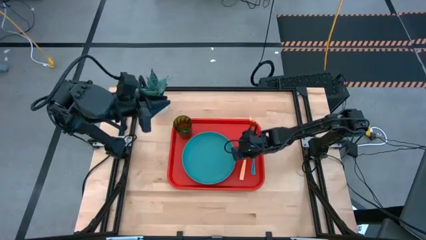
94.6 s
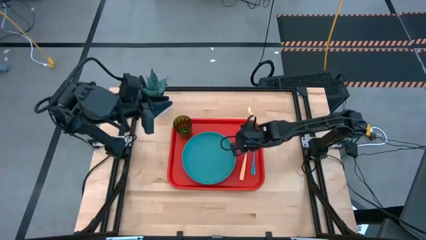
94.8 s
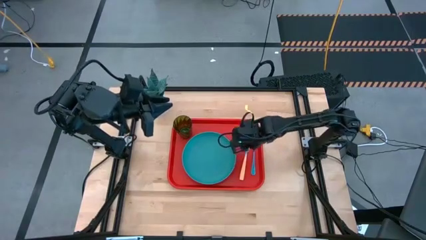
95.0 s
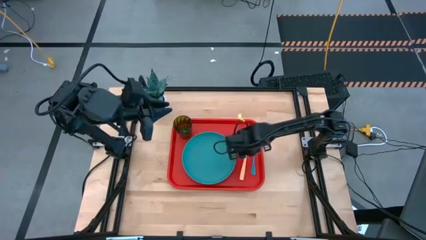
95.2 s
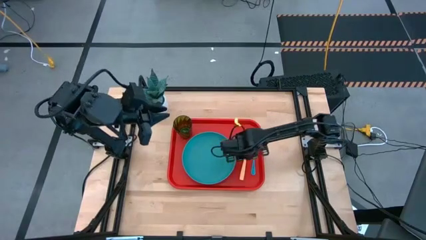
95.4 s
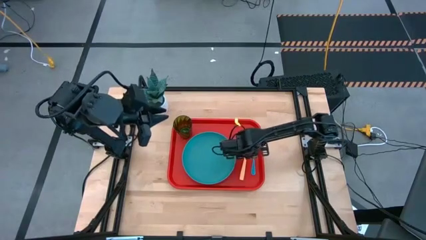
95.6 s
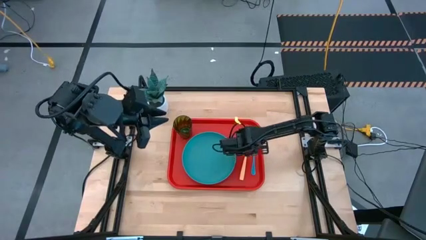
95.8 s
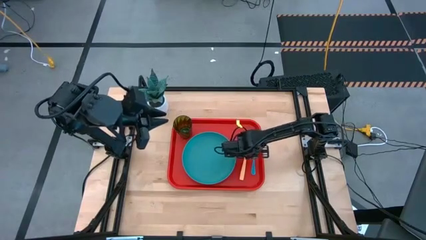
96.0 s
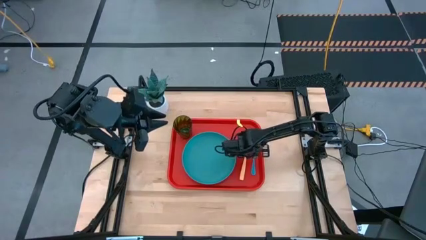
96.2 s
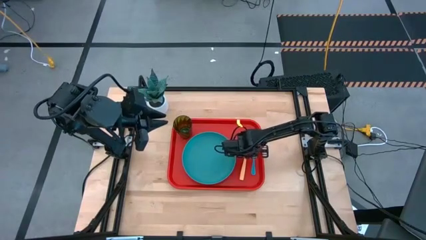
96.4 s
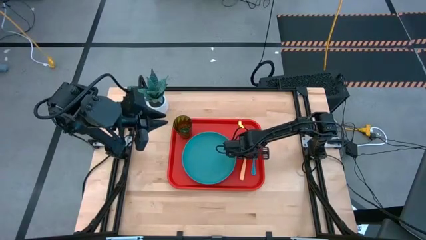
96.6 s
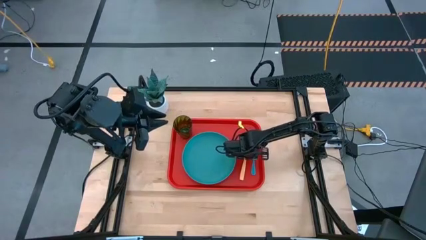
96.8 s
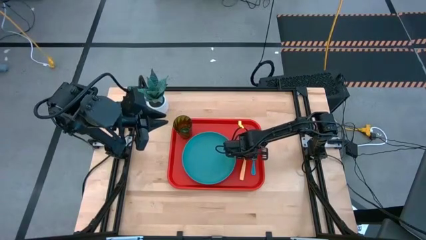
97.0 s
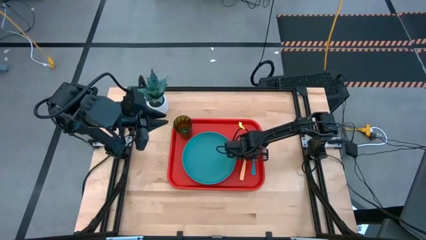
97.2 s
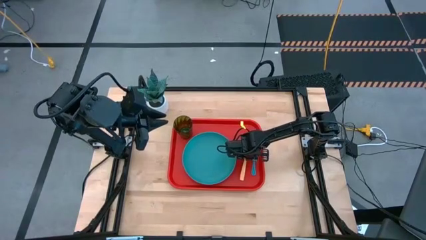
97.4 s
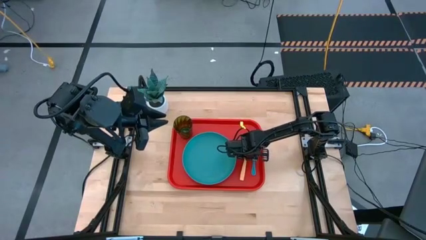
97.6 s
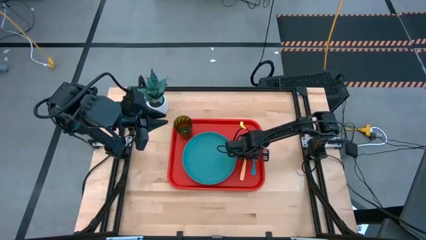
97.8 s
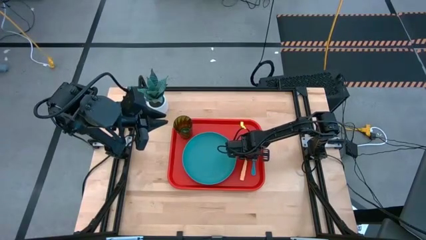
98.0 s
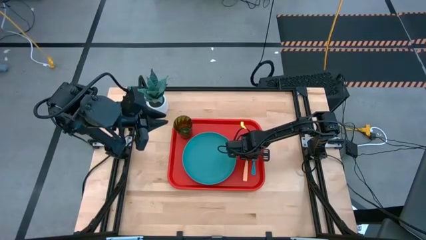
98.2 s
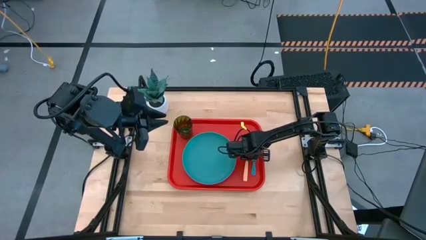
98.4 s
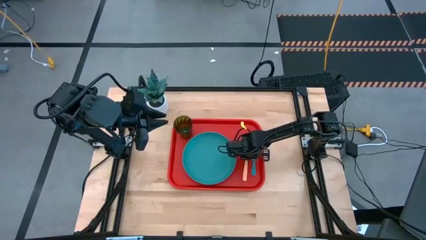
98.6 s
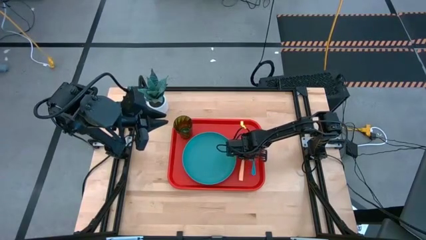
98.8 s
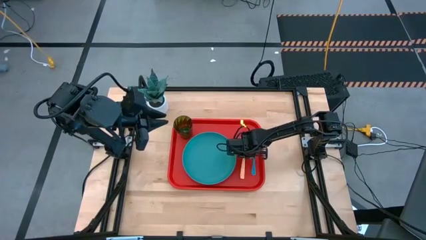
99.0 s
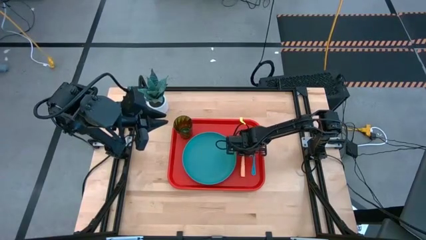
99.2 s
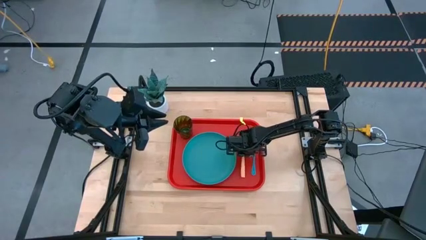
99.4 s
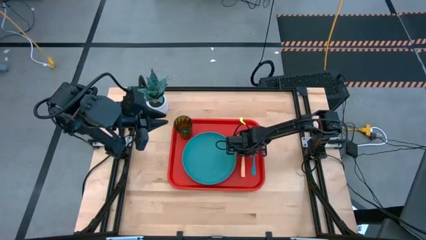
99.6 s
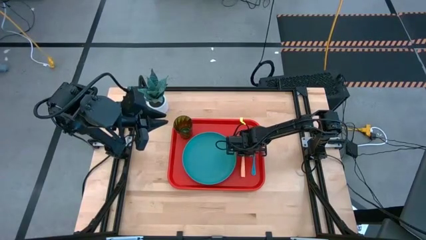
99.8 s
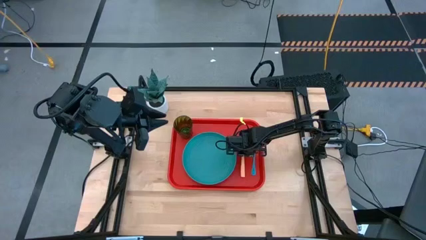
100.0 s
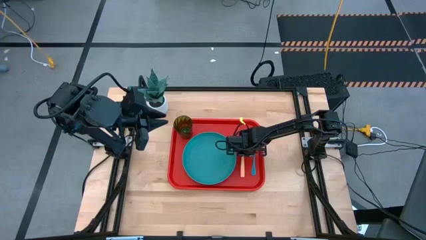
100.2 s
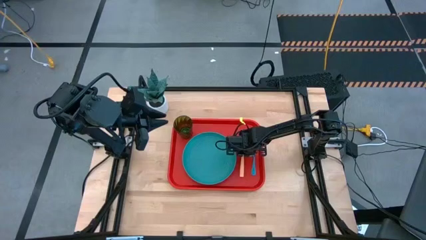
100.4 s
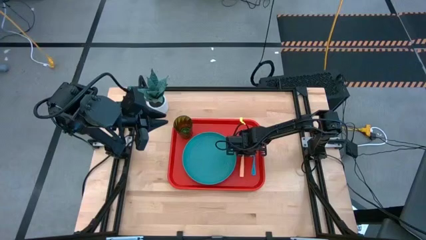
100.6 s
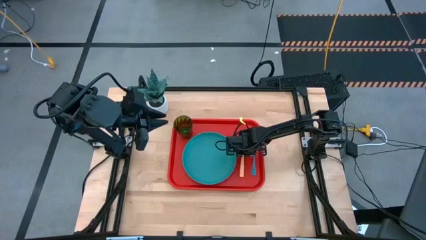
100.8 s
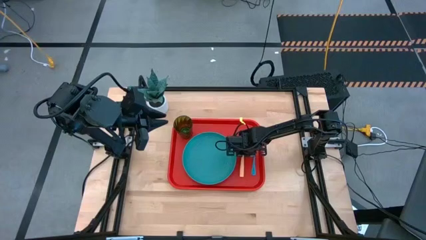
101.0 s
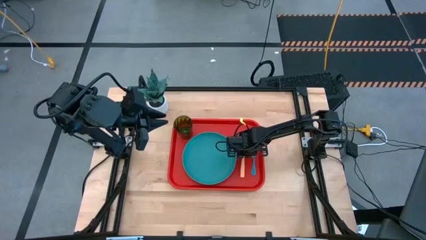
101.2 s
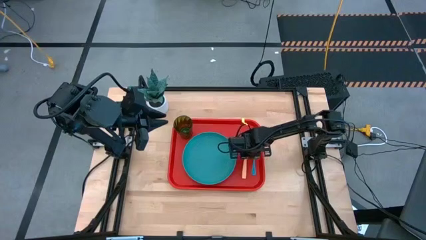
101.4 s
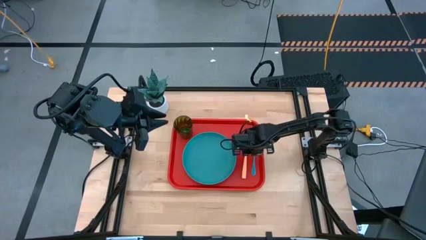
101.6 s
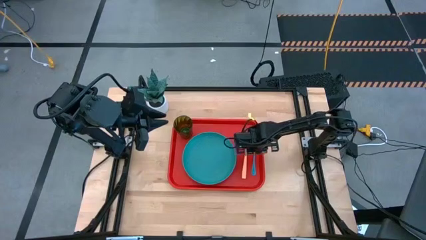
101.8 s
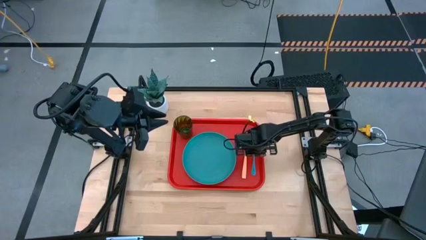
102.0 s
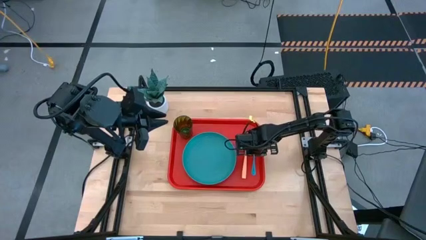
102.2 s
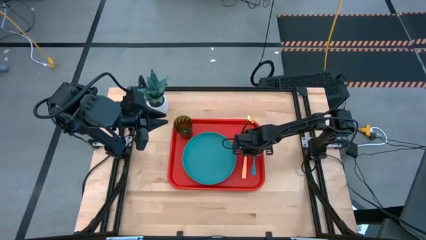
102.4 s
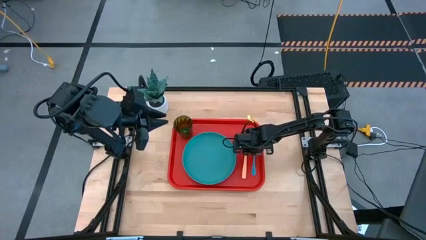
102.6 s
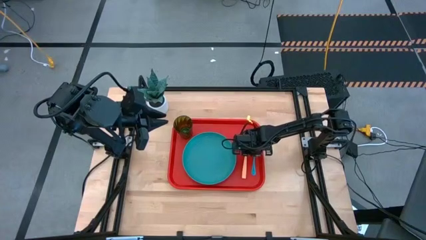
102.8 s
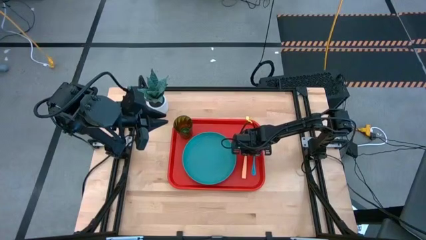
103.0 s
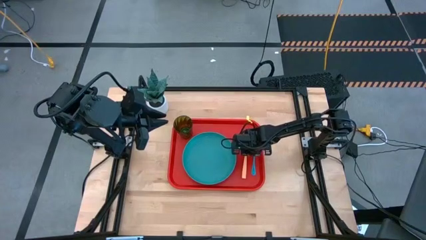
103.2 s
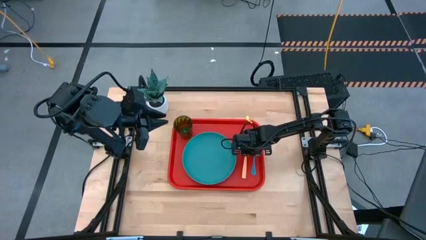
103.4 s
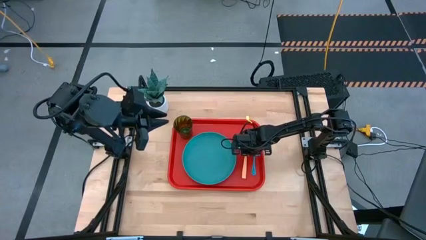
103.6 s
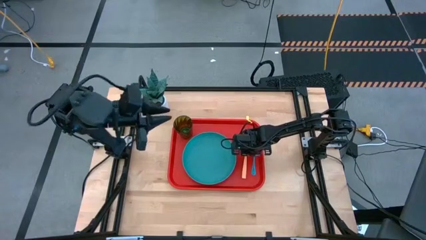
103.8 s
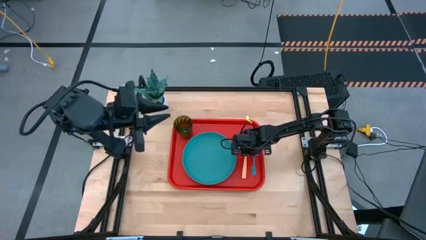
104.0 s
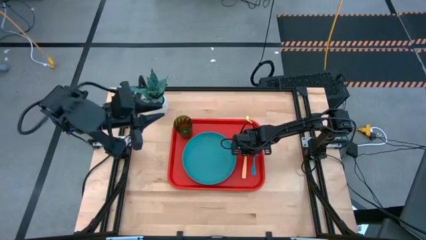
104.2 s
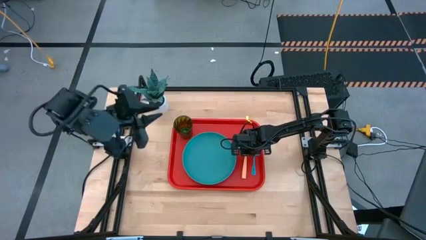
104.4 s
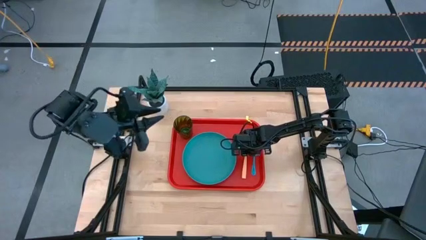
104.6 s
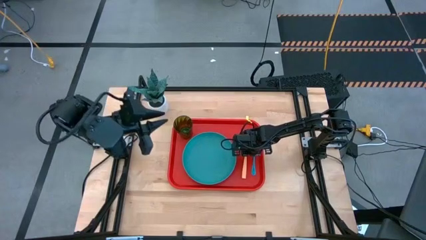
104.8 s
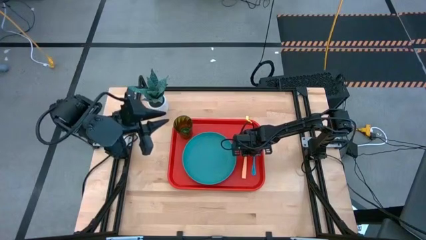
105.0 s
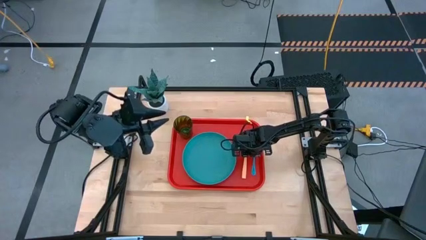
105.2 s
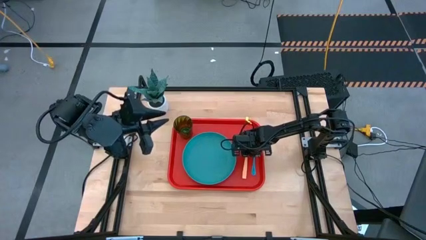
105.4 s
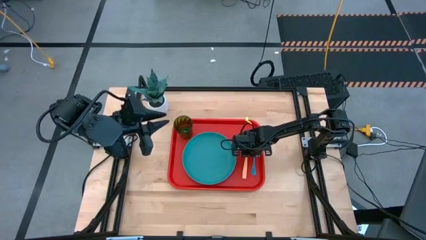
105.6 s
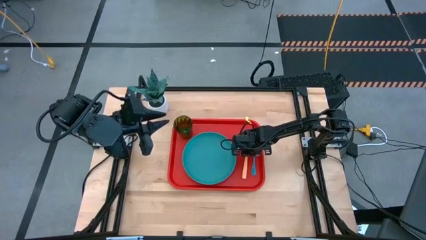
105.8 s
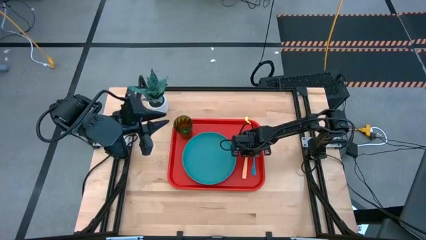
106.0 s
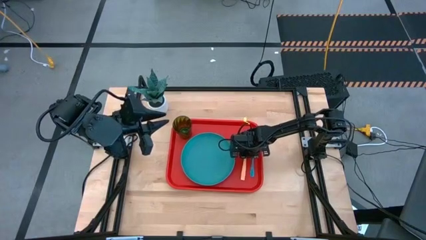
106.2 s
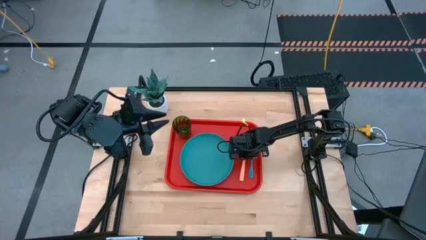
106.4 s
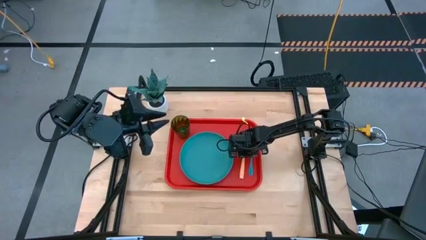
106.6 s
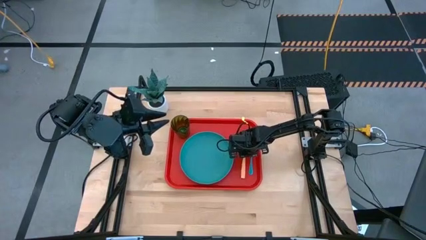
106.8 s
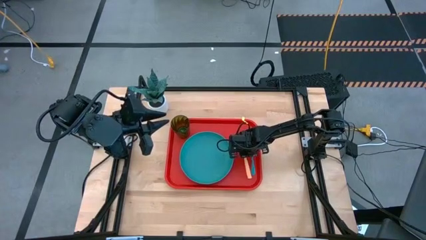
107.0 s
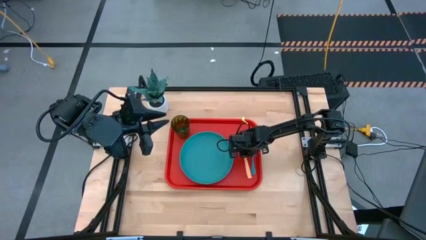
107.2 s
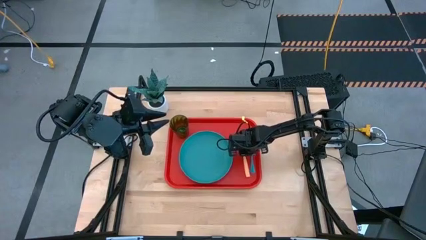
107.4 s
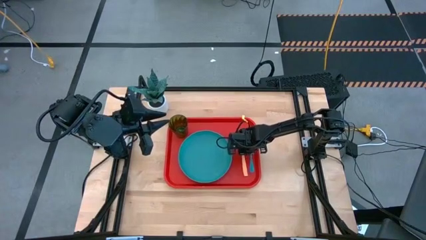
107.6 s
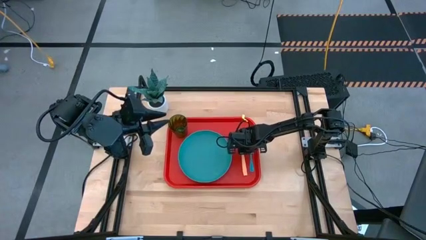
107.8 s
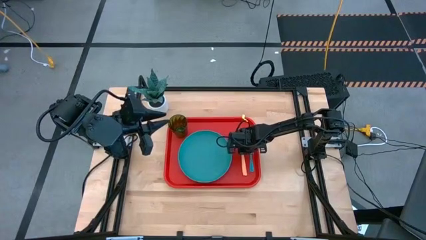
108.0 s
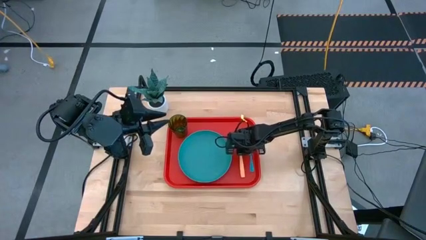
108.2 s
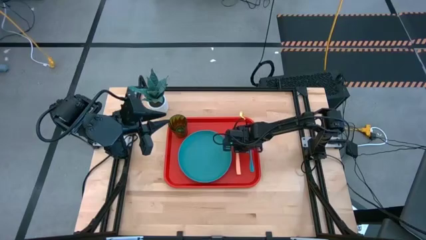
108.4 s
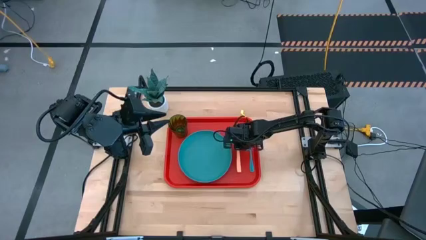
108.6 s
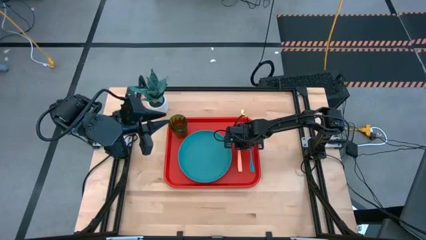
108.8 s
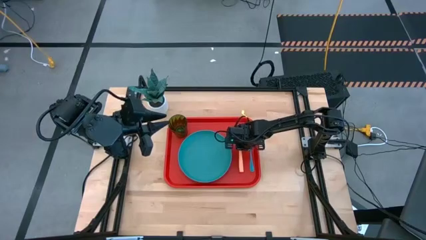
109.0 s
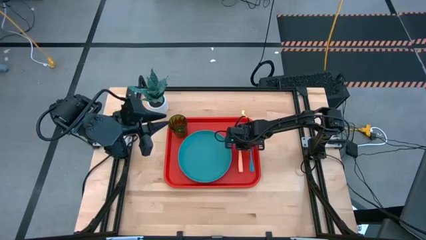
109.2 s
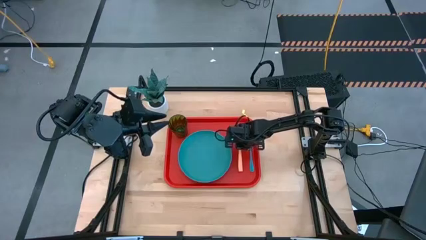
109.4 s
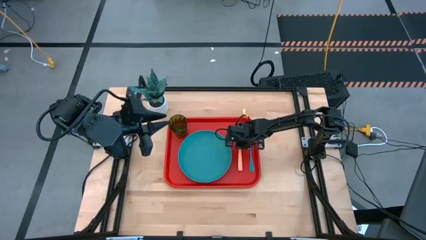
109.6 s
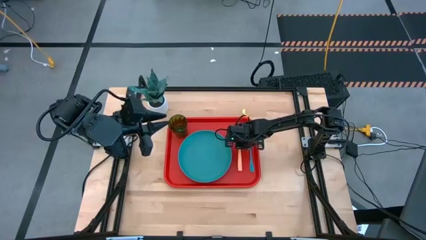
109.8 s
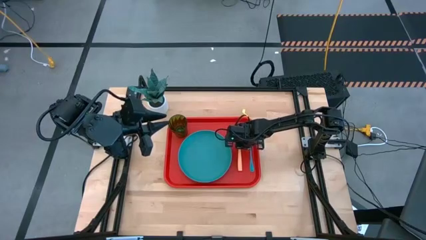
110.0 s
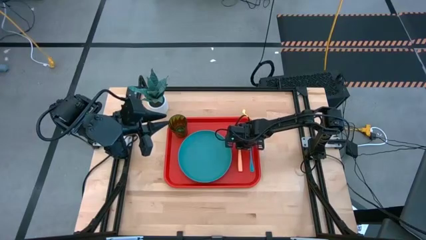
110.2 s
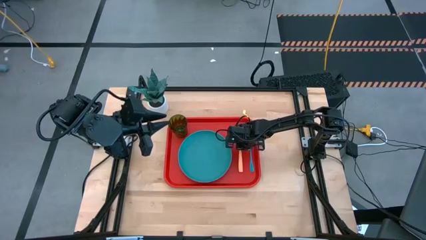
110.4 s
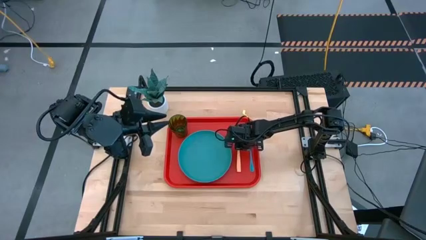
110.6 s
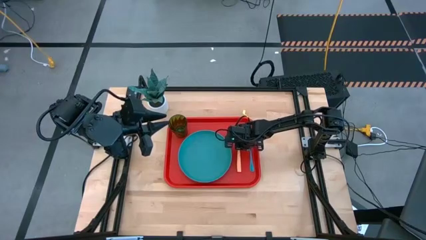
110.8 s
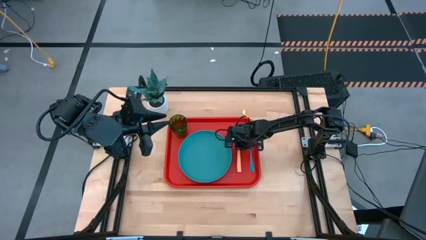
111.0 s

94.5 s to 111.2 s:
Task: Pick and place plate/cup/fork/spoon on tray
Put the yellow fork on the red tray between the blue plate and the blue spoon
